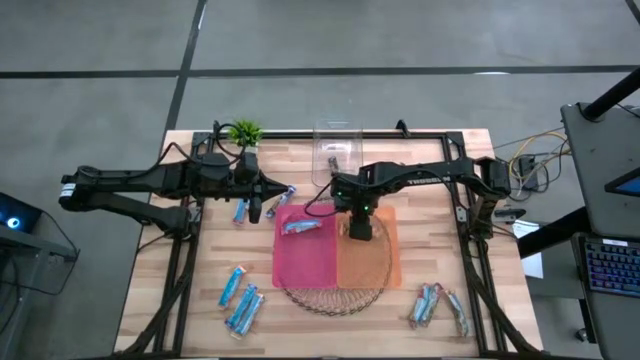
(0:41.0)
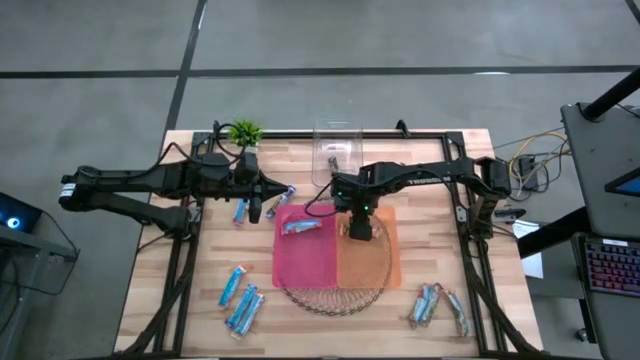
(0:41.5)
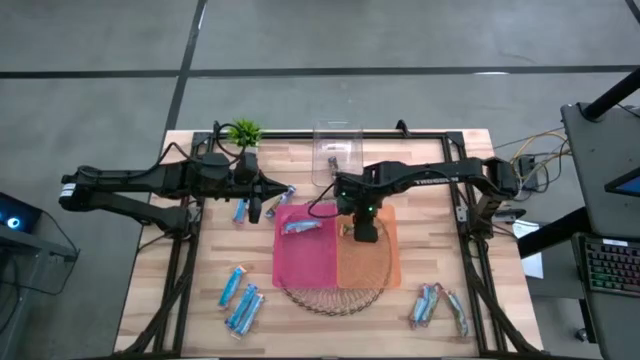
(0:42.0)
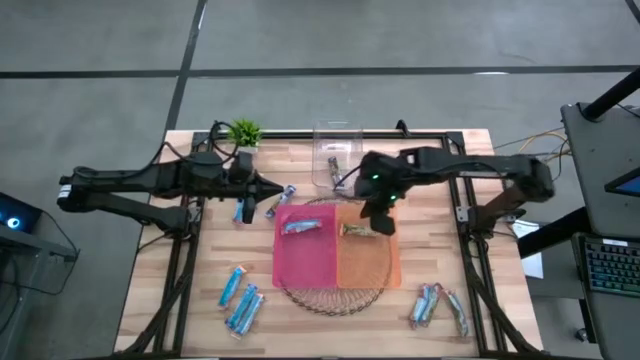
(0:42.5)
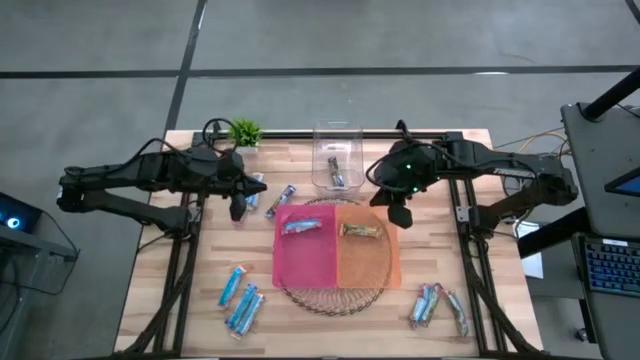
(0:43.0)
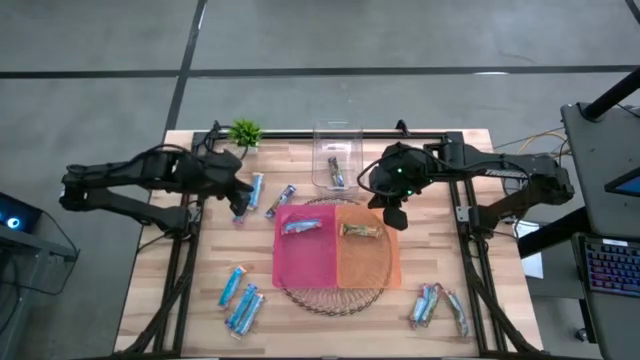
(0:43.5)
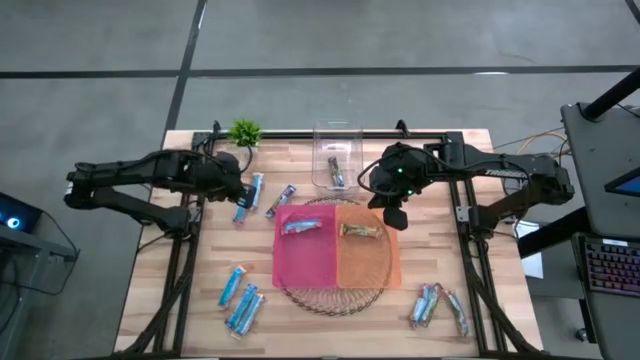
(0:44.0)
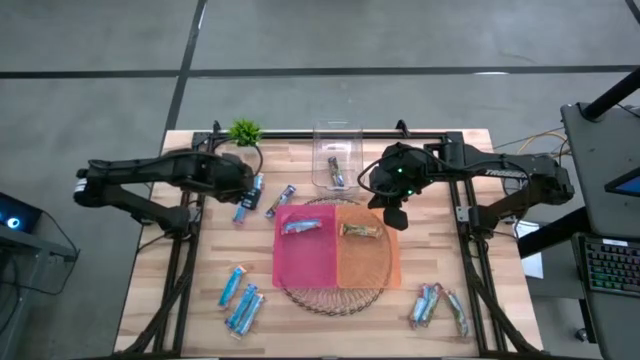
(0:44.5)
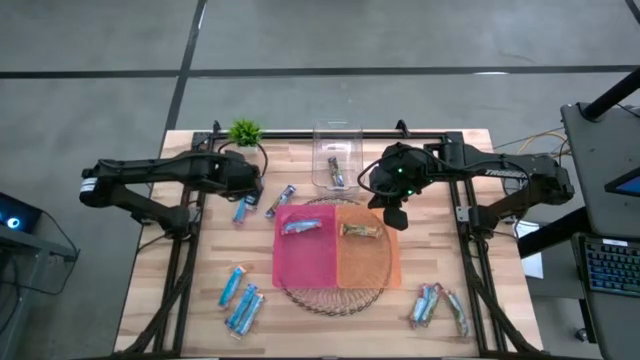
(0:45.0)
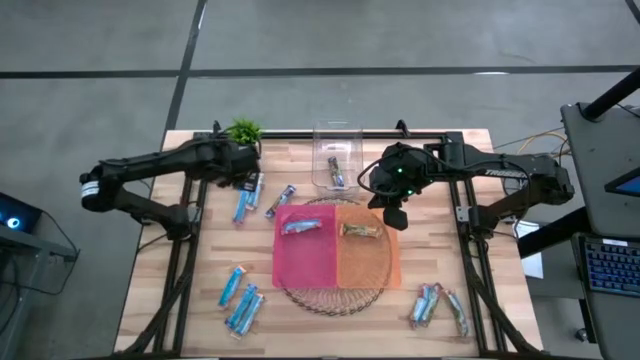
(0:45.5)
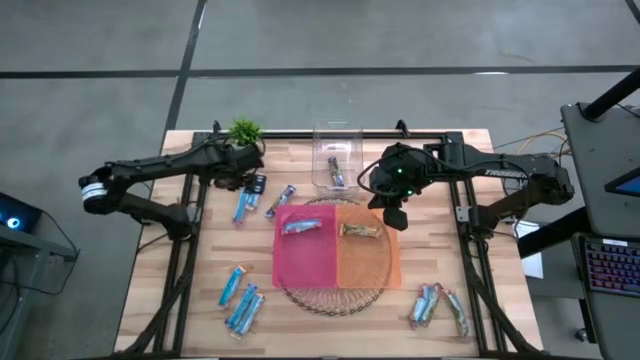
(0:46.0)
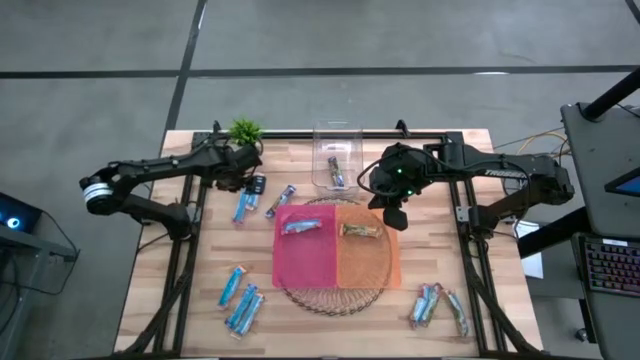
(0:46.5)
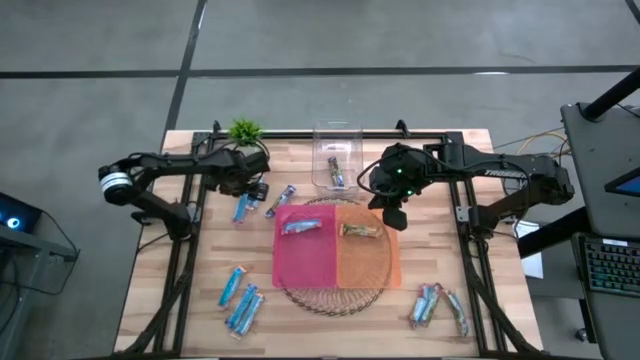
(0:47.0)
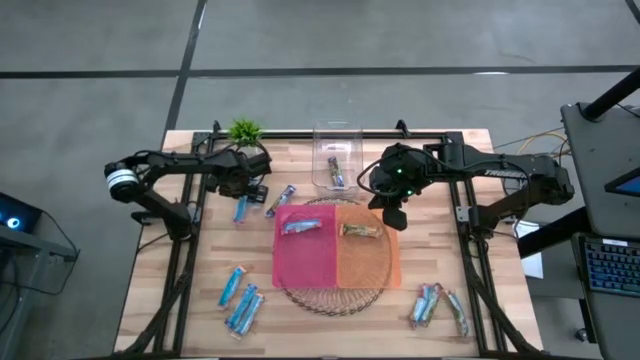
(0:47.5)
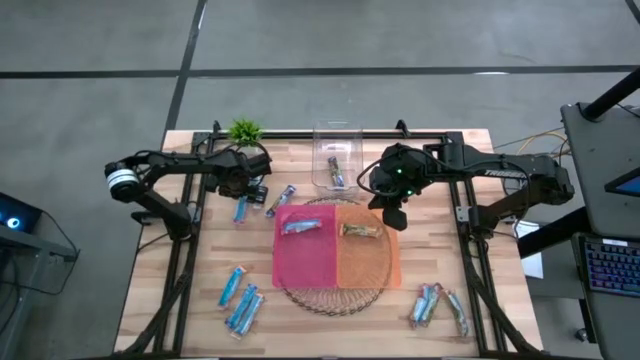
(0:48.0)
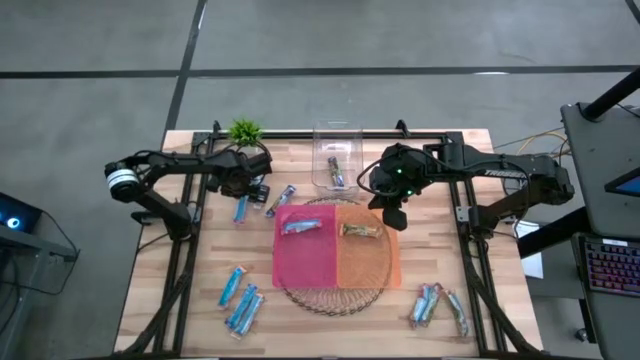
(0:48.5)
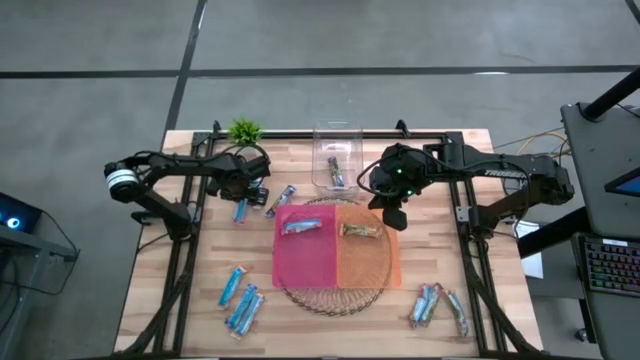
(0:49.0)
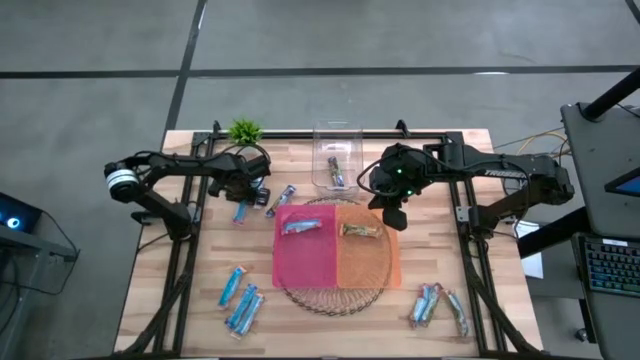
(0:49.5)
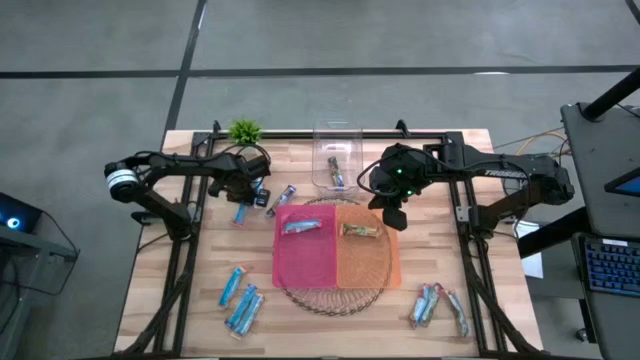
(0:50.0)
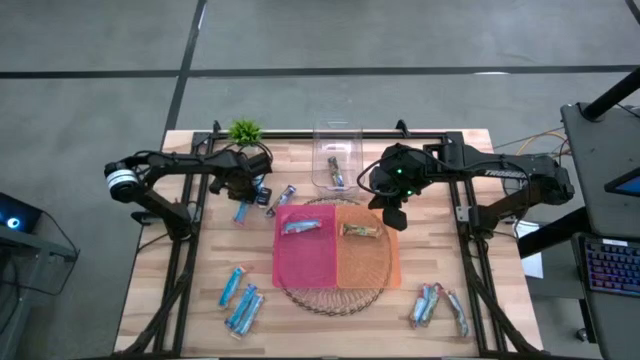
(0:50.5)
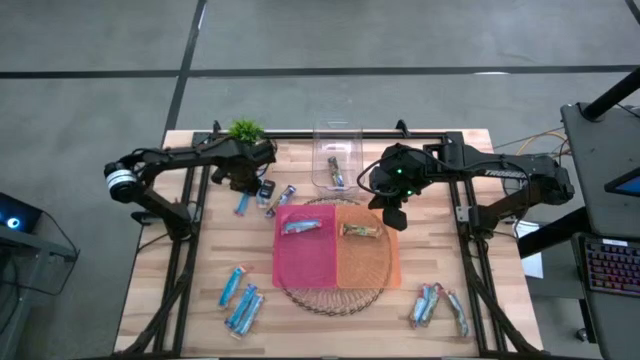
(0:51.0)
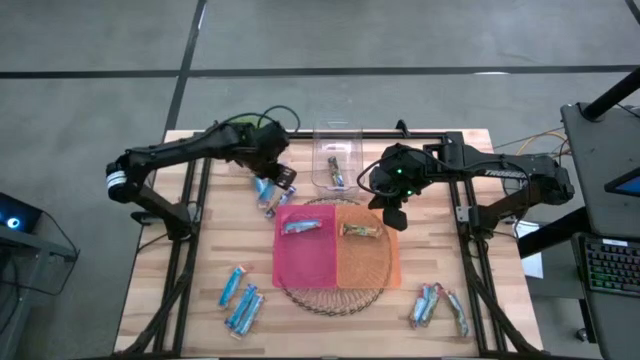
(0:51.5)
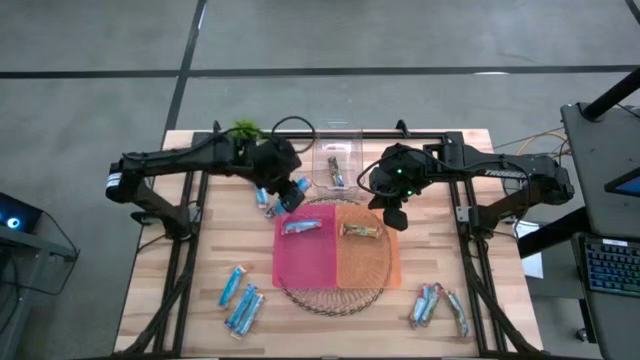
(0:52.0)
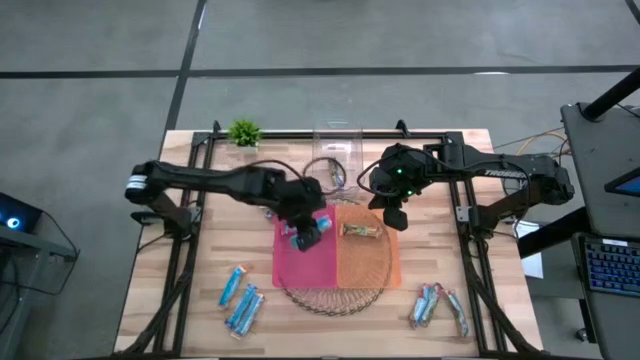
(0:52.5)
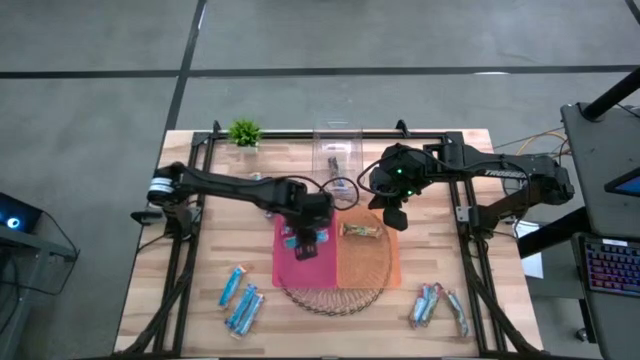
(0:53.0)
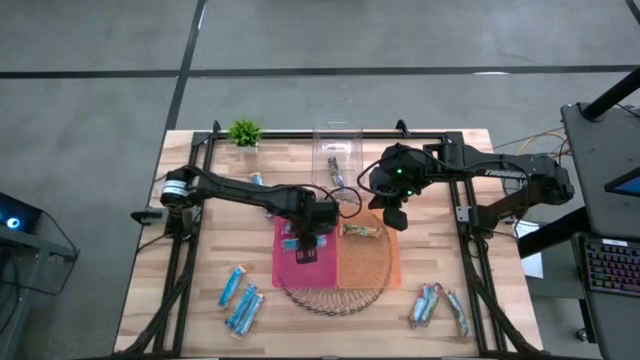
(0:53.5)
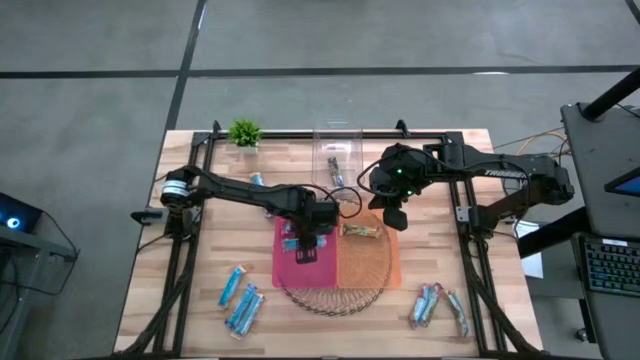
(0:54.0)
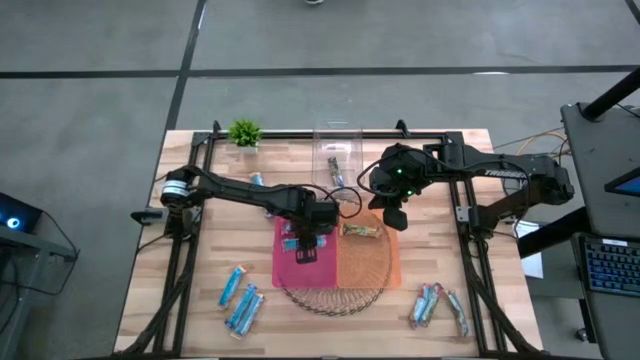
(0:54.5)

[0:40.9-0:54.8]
Task: Pick and place Granola Bars by type
Put the red granola bar into the red bin

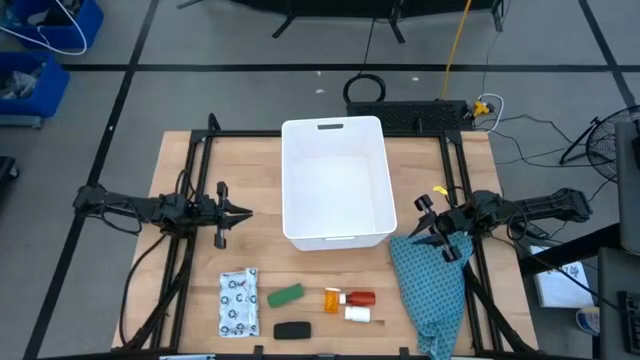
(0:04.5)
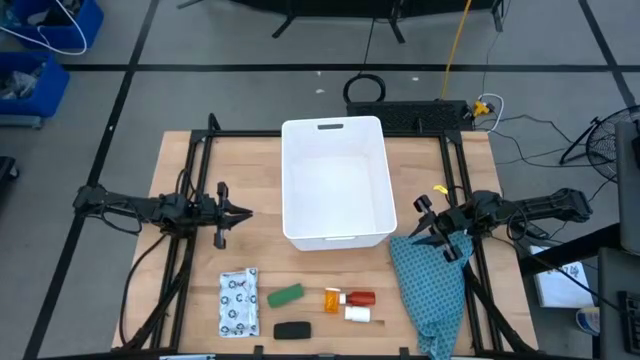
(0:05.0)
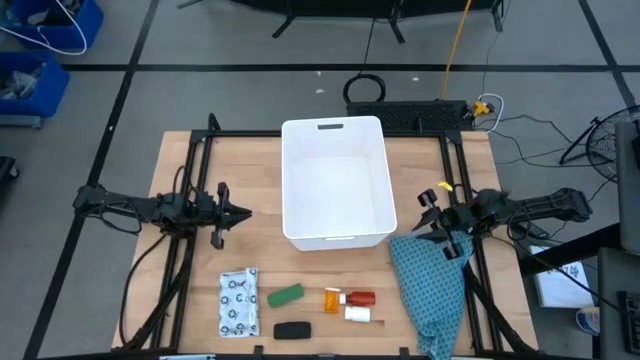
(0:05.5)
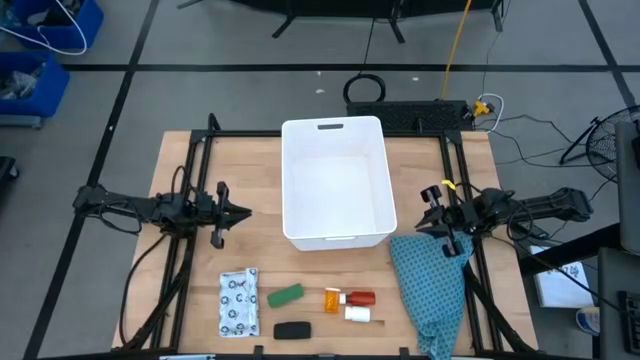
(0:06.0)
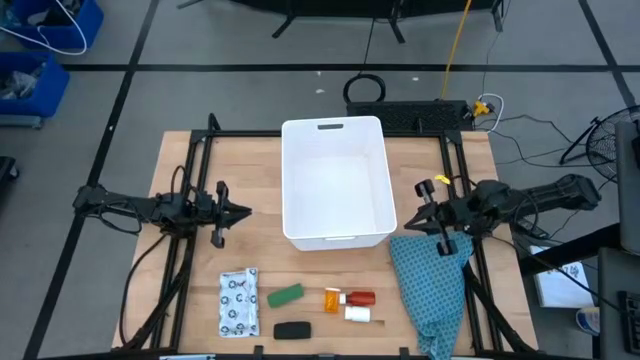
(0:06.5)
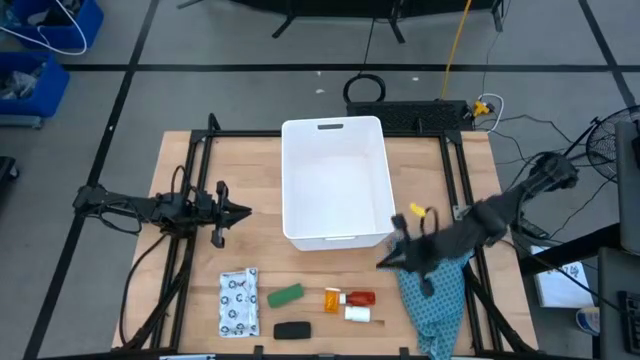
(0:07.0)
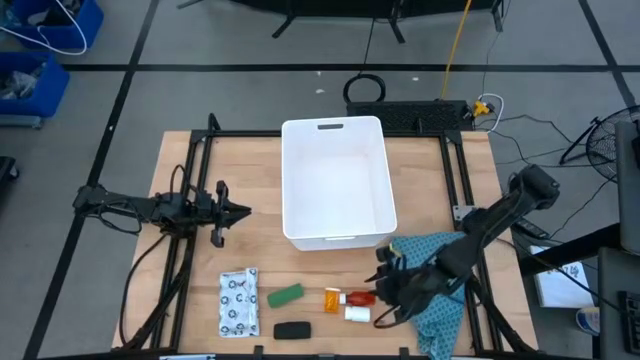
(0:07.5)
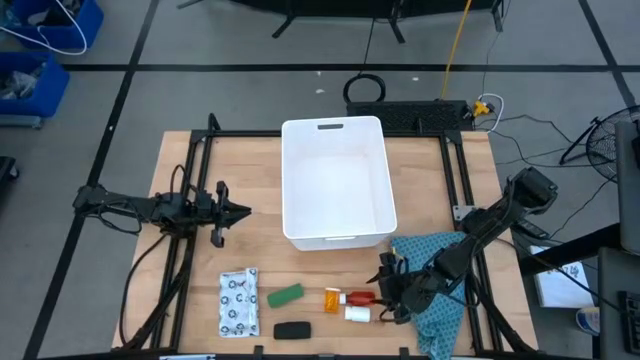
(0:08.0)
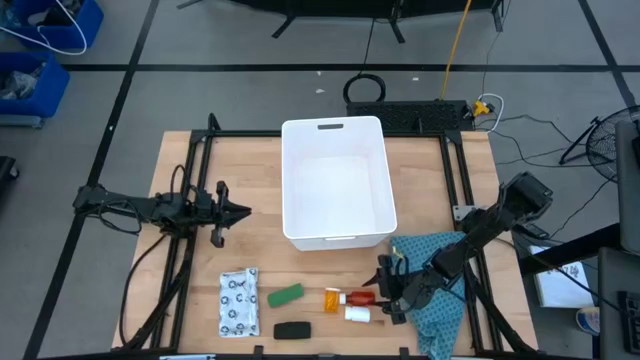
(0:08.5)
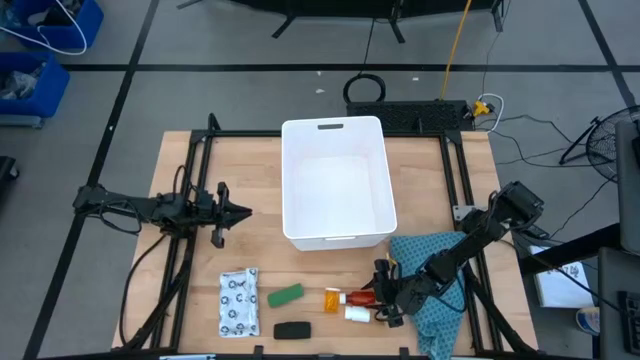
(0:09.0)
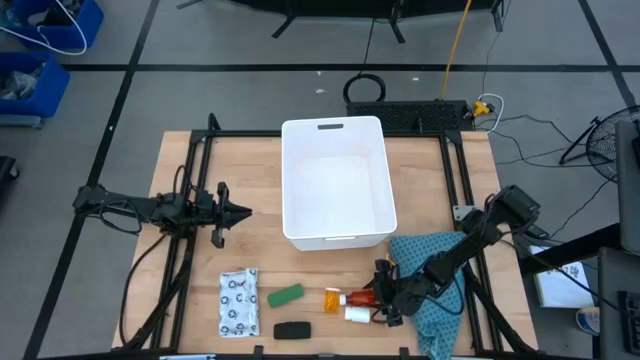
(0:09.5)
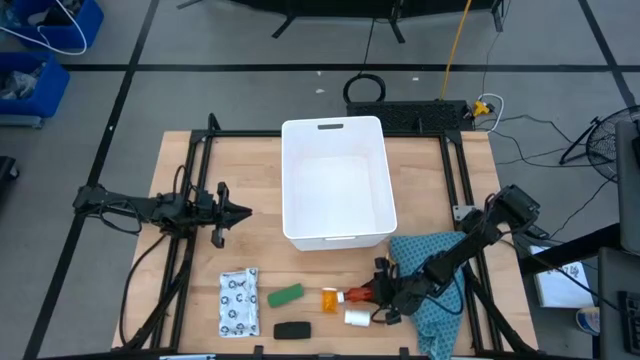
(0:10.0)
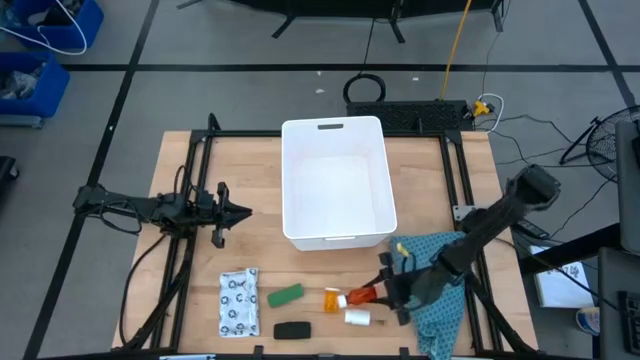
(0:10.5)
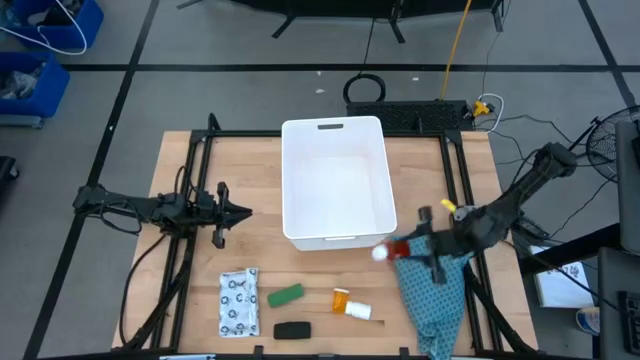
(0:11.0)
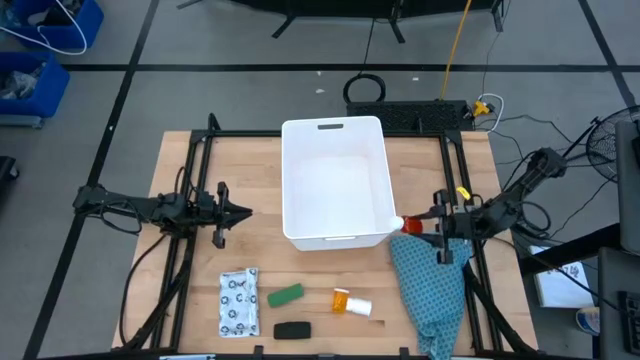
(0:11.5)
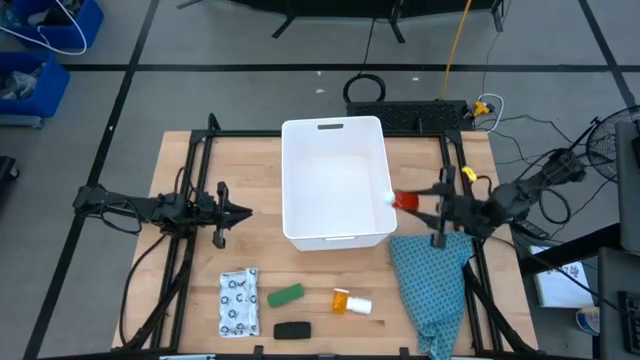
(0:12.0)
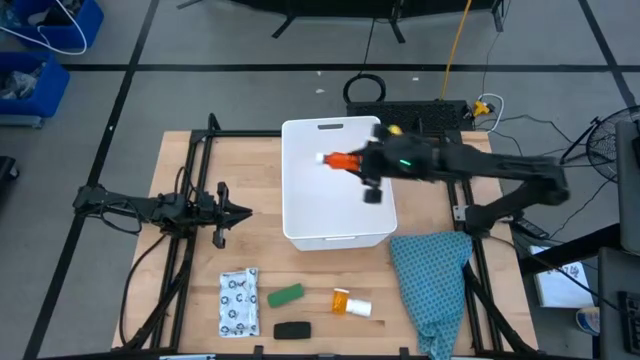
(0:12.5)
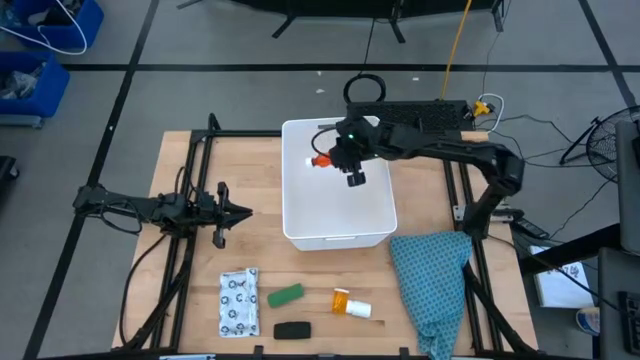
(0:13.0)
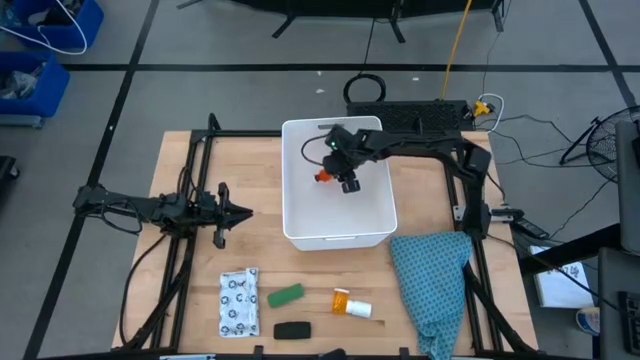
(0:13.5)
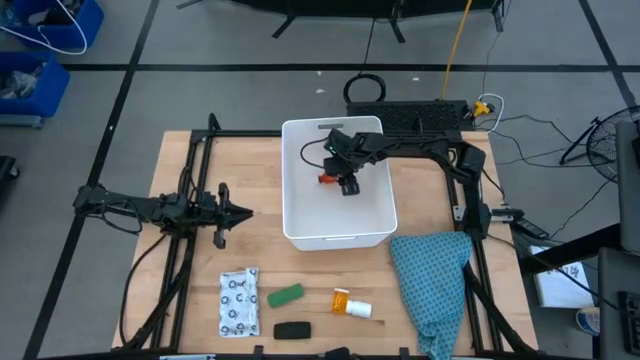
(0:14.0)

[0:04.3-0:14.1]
Task: Pick & place medical supplies in basket/bin
Put the orange medicine bottle into the basket
